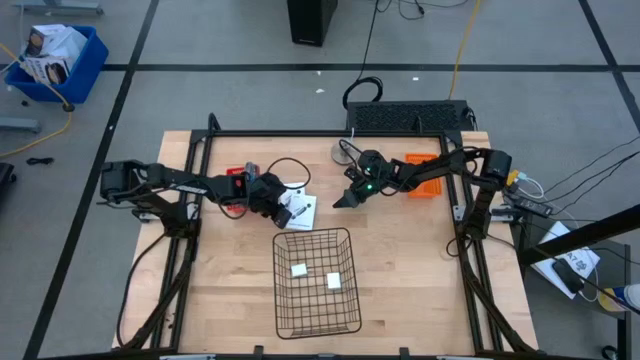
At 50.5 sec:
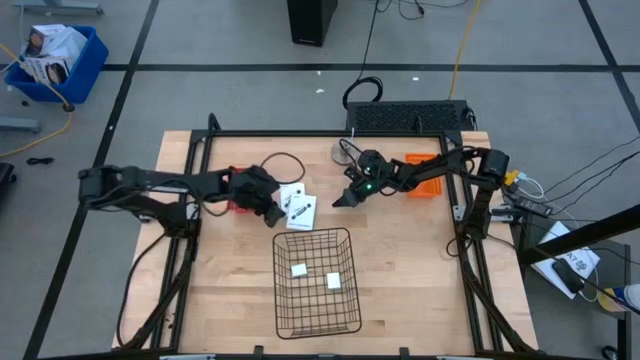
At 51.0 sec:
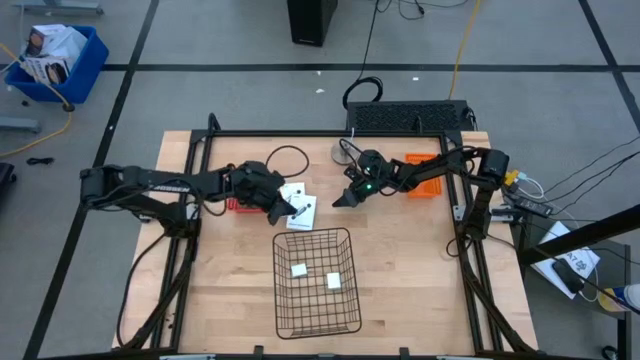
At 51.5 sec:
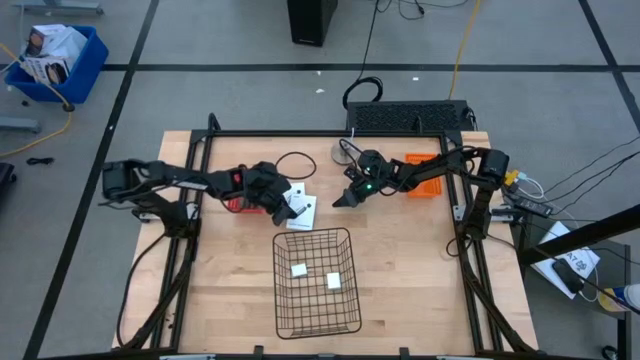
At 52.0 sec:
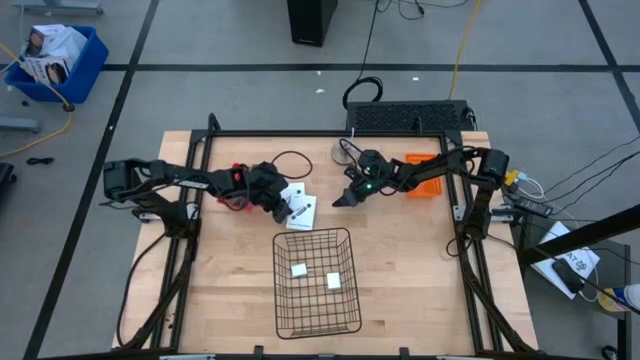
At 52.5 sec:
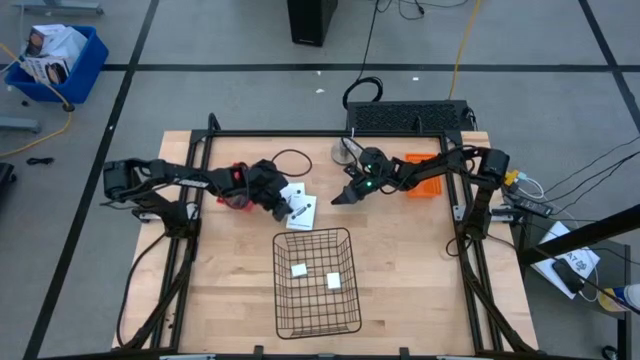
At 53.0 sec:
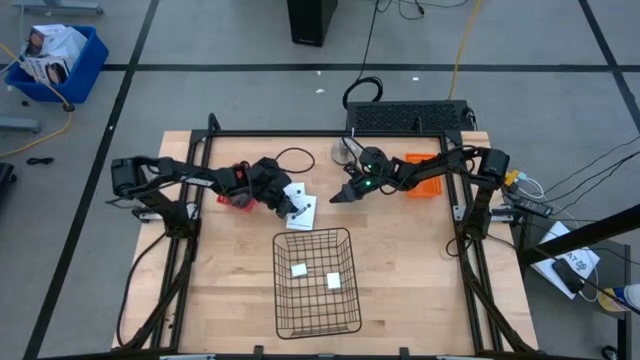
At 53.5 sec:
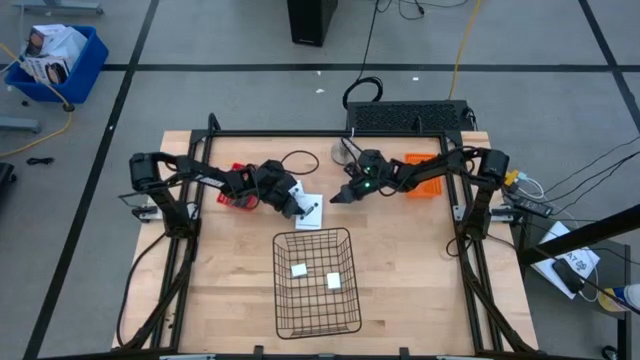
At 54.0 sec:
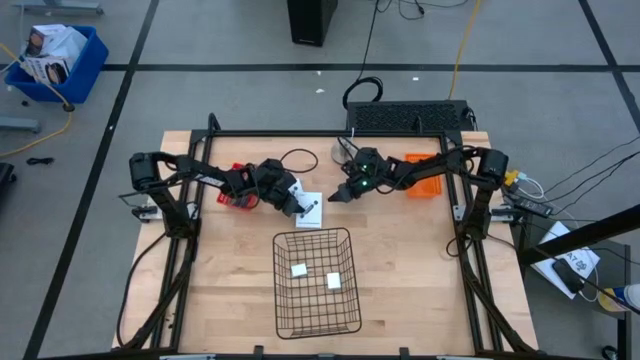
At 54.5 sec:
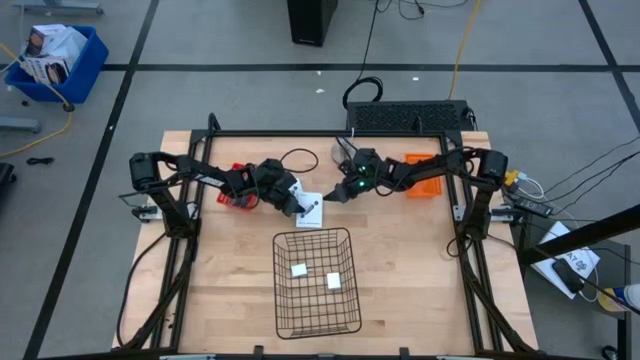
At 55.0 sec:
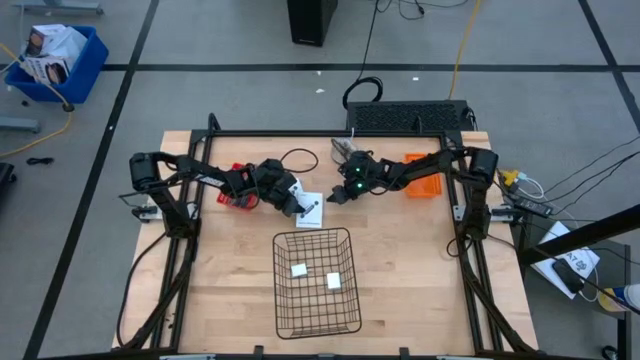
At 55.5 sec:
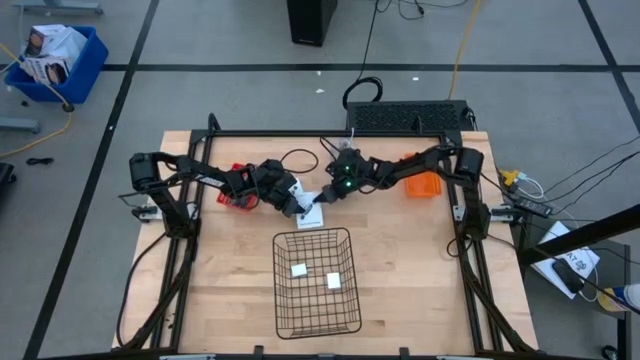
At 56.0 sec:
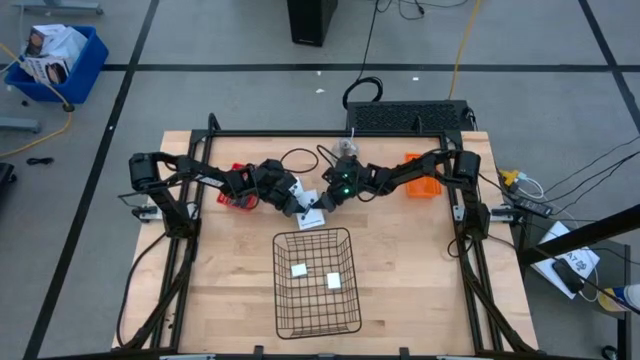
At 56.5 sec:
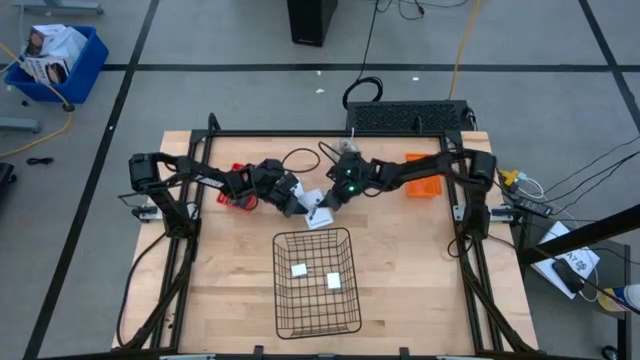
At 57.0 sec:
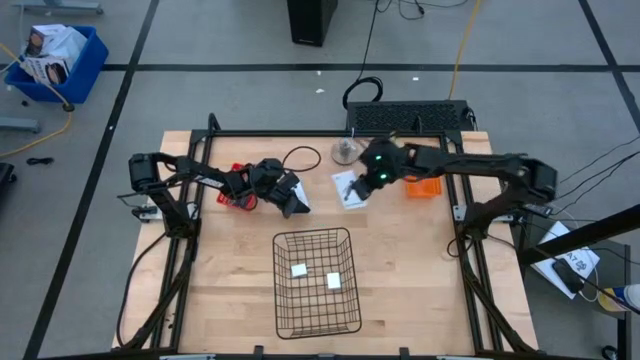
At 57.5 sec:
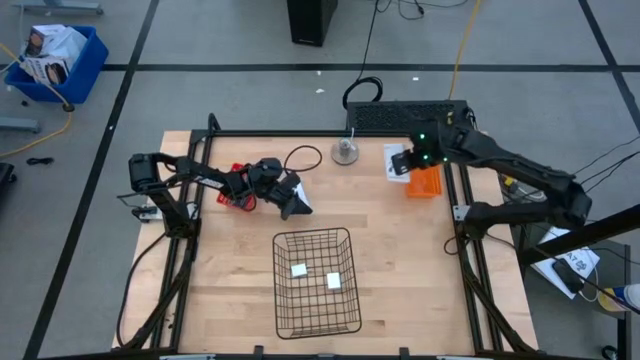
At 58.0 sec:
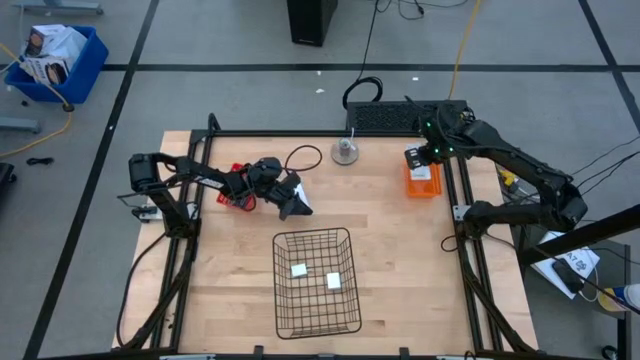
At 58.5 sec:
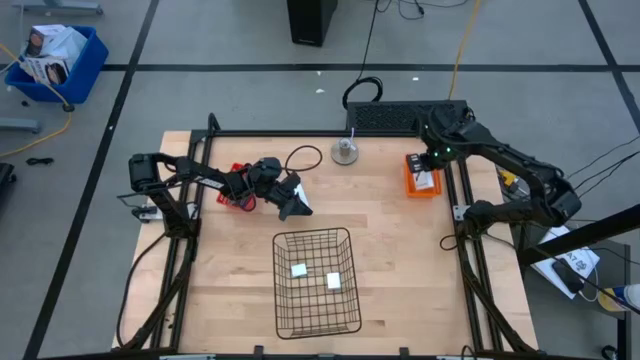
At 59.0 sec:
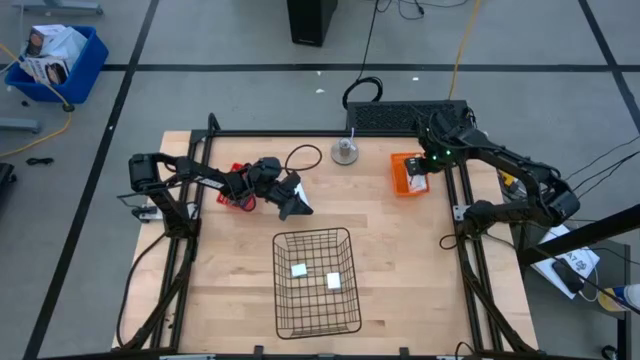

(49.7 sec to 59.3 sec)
Task: Pick and place items into bin
Put the top white card reader box into the orange bin

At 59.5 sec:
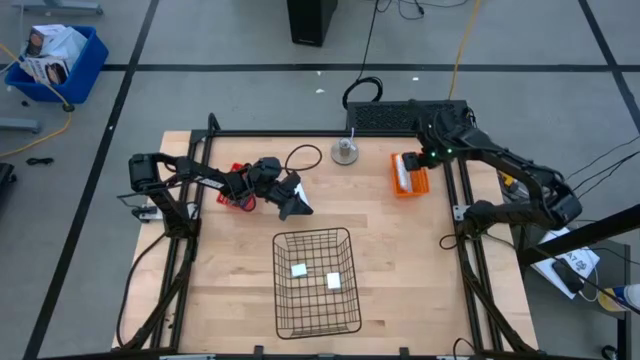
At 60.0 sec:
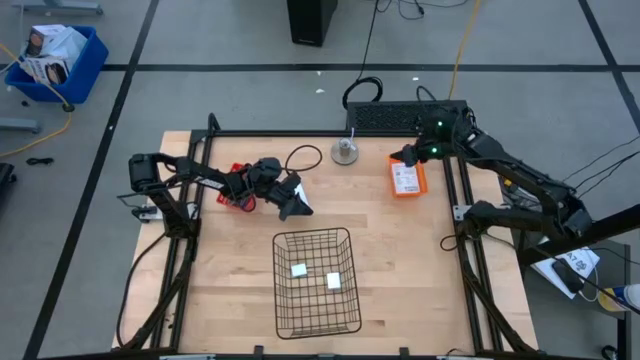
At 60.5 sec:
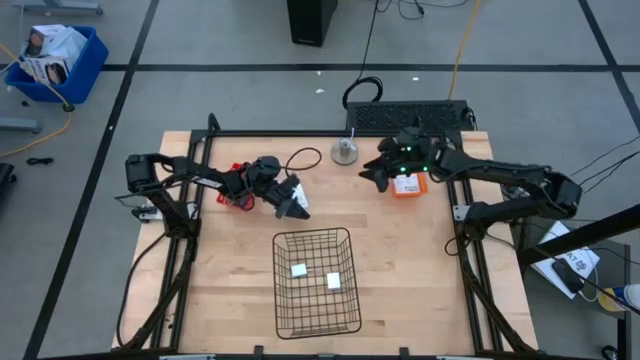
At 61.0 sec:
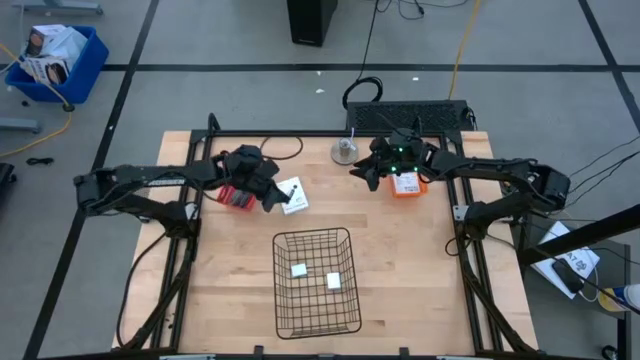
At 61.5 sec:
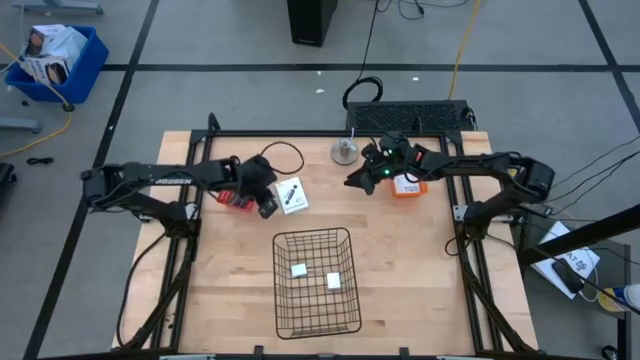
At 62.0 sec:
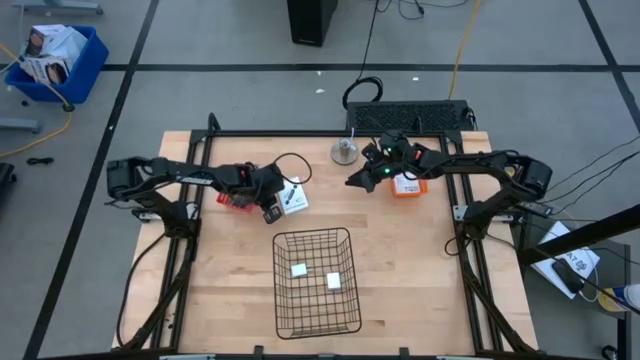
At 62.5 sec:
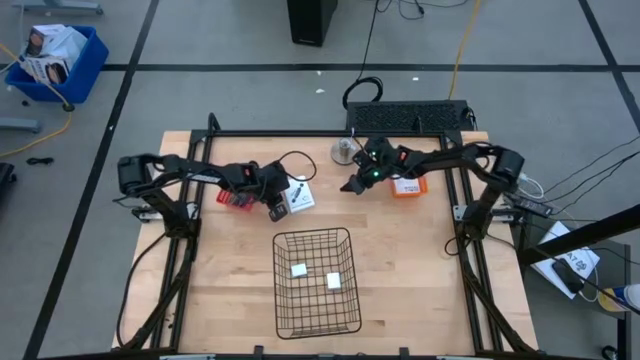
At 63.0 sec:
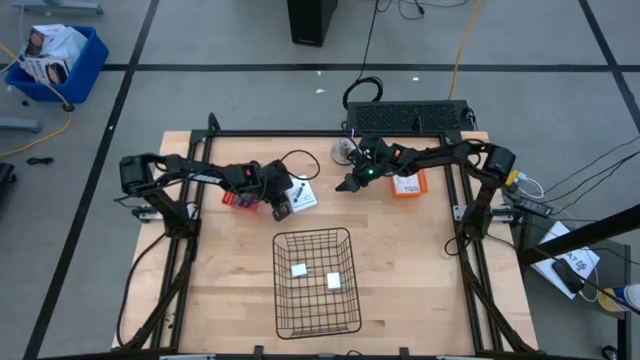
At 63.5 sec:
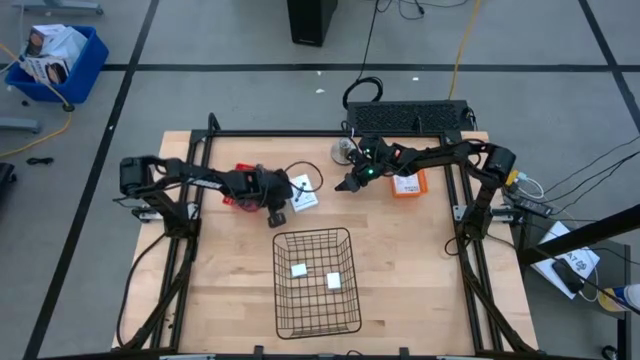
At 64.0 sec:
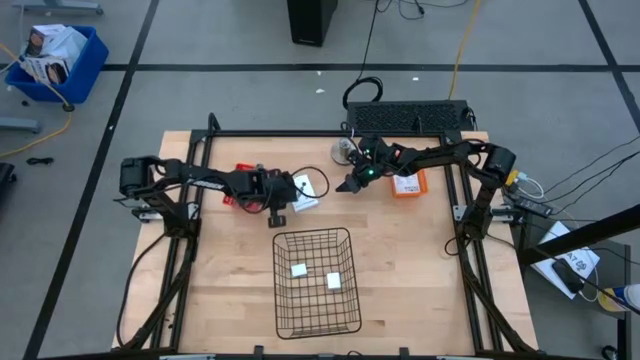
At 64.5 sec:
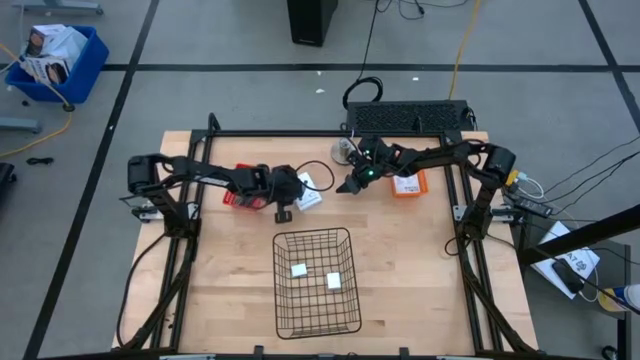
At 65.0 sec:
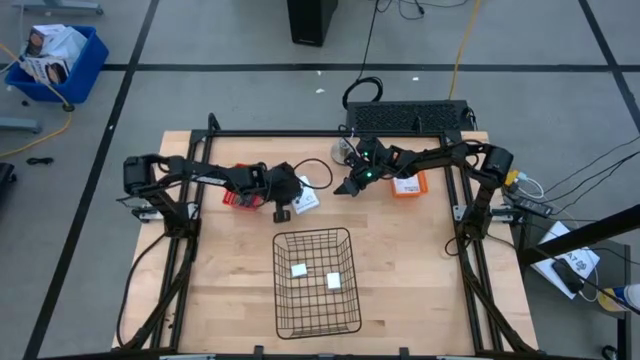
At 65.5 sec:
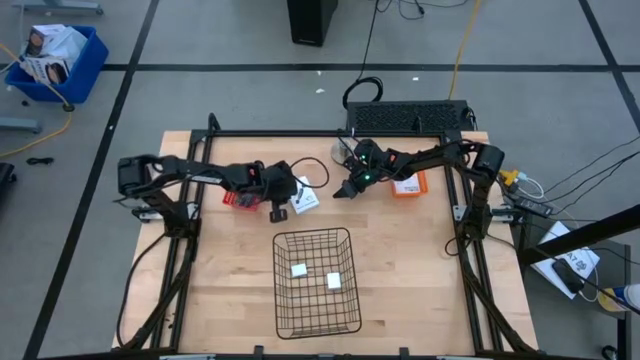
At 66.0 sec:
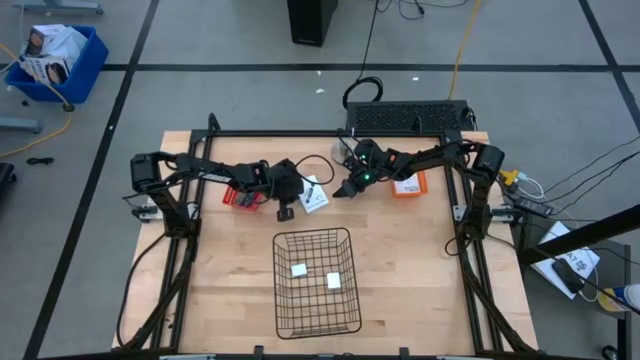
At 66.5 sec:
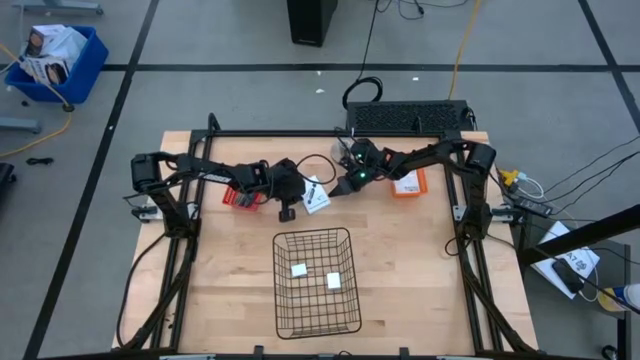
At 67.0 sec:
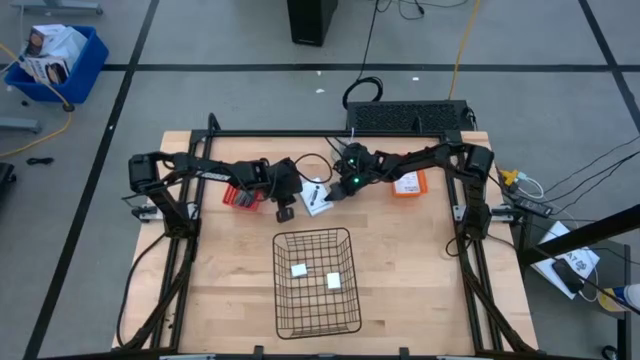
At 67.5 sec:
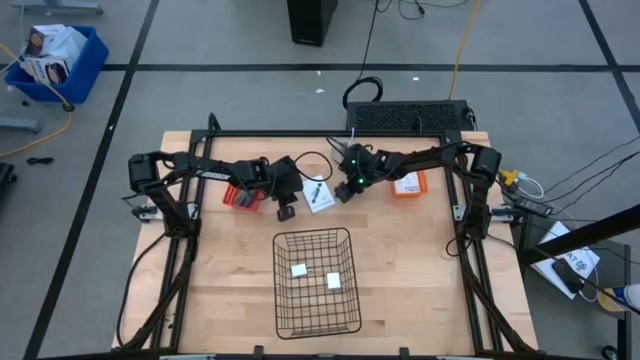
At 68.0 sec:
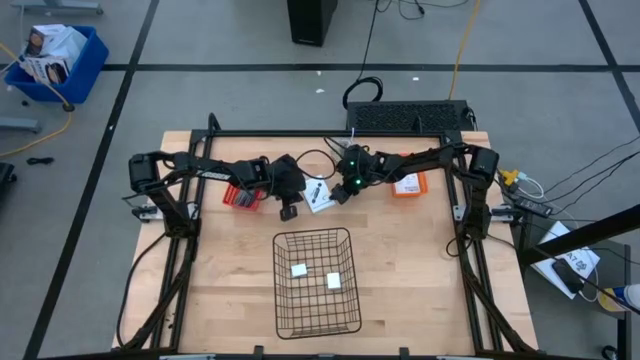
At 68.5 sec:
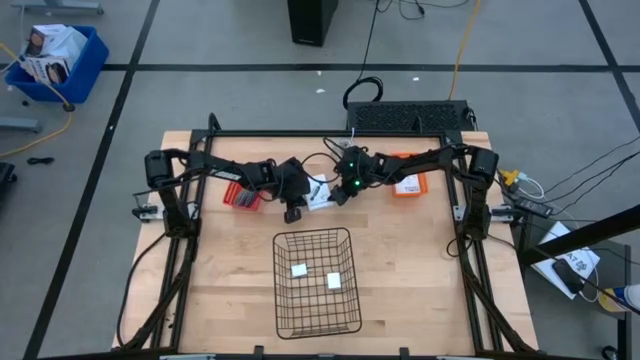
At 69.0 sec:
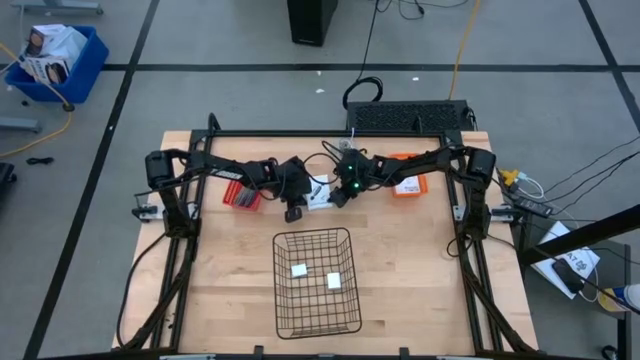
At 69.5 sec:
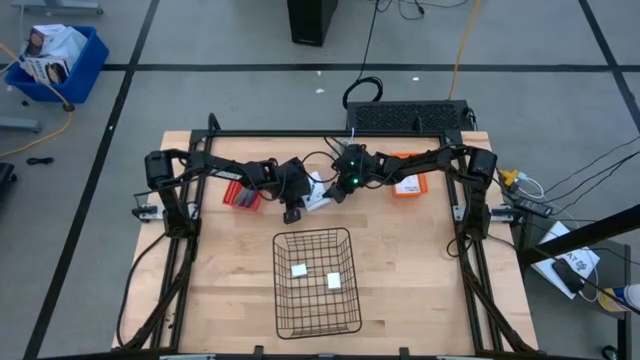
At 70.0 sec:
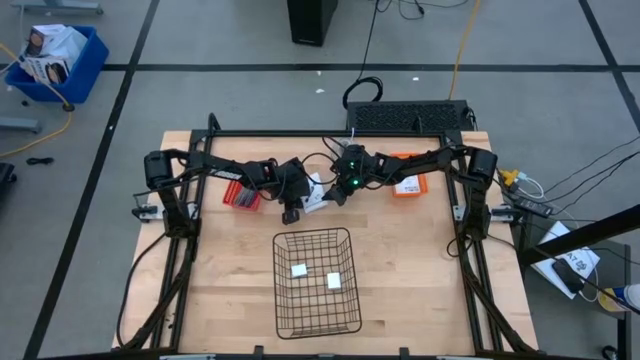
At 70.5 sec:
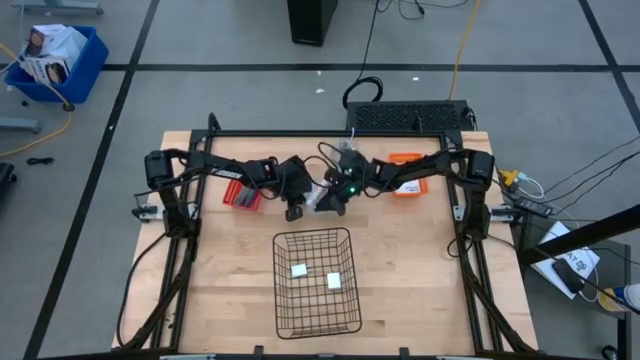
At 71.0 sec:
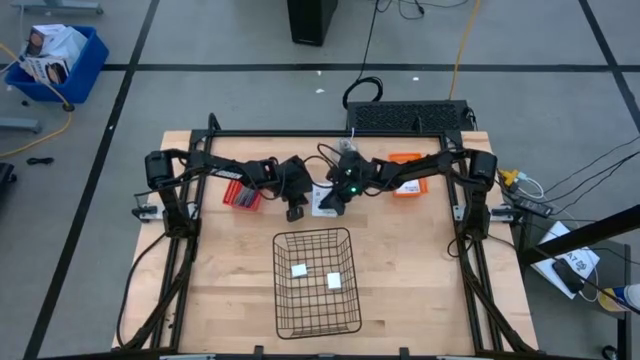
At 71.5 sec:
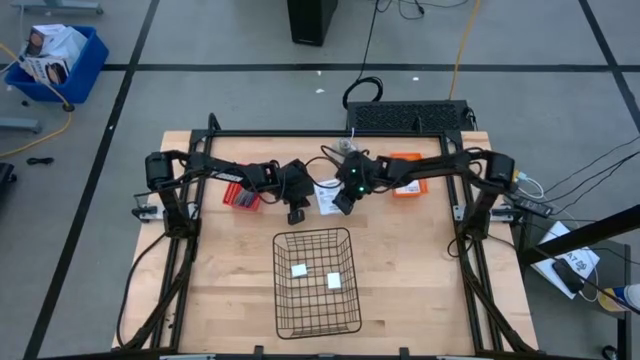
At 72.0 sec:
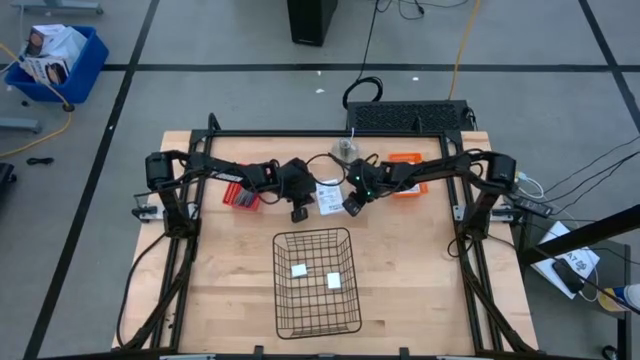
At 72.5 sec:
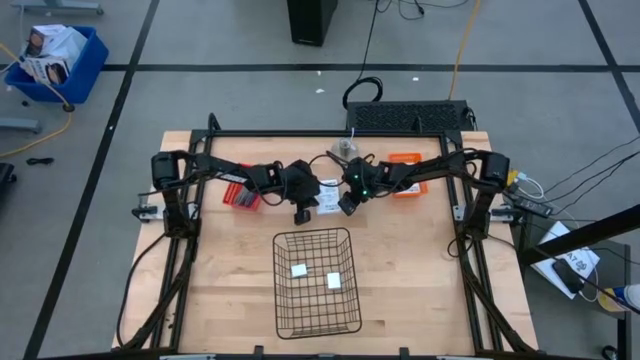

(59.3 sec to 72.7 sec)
Put the white card reader box into the orange basket
